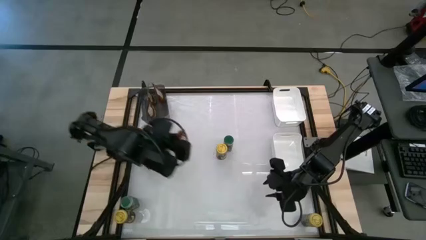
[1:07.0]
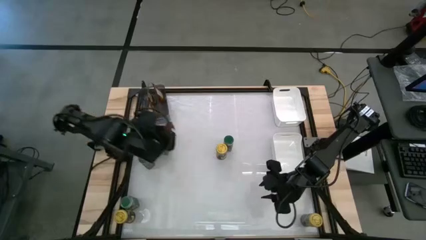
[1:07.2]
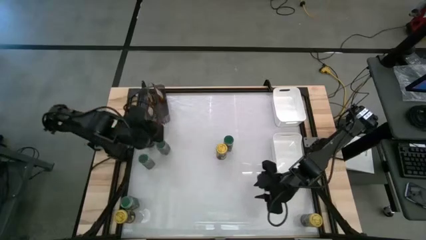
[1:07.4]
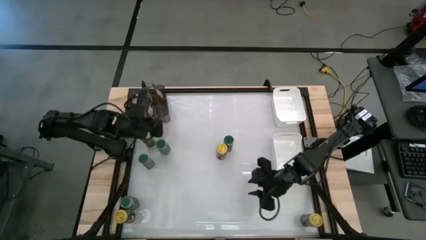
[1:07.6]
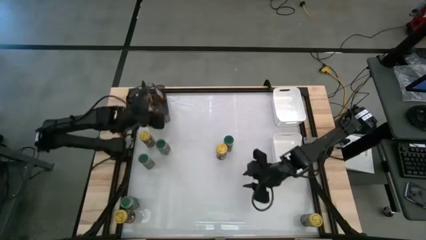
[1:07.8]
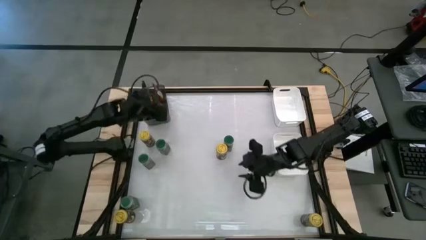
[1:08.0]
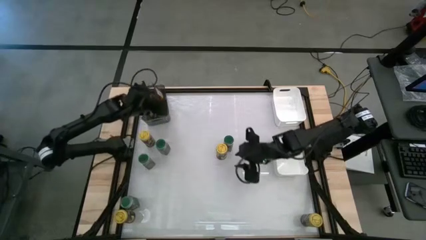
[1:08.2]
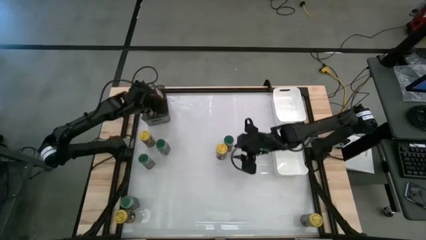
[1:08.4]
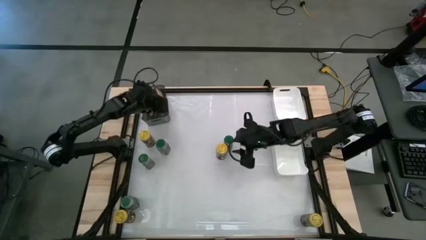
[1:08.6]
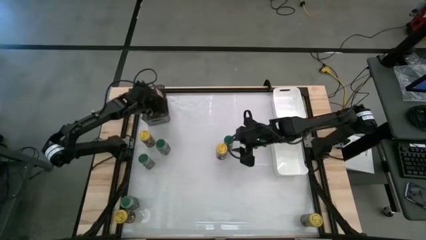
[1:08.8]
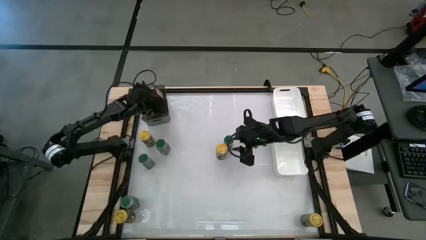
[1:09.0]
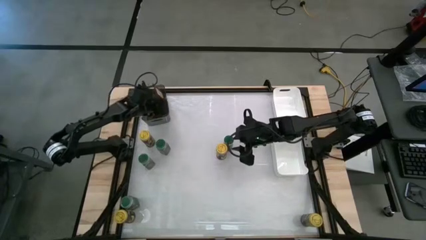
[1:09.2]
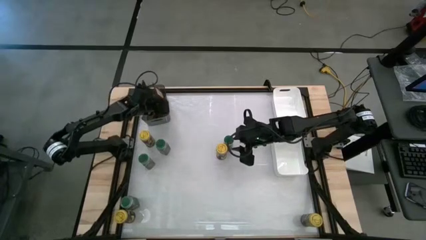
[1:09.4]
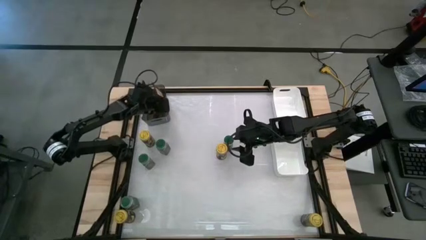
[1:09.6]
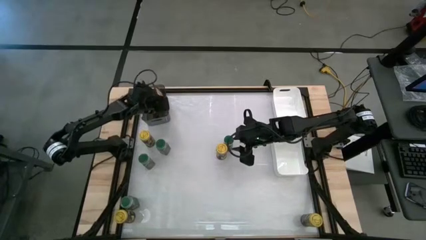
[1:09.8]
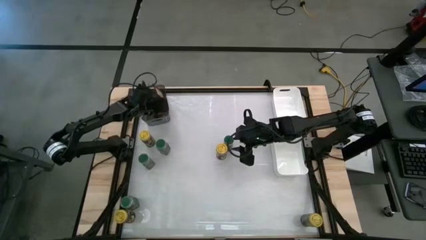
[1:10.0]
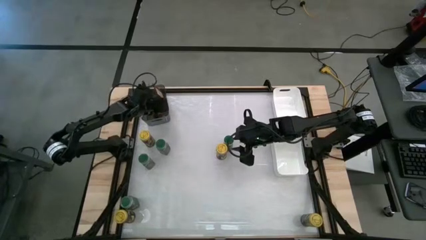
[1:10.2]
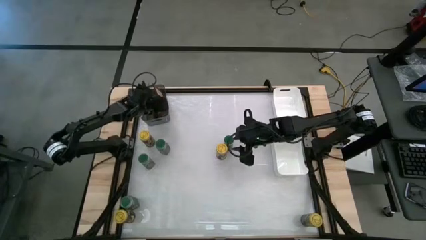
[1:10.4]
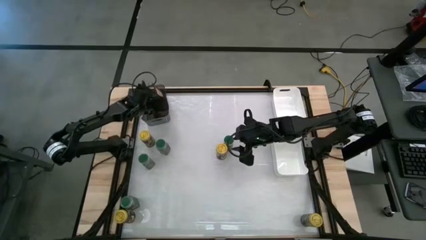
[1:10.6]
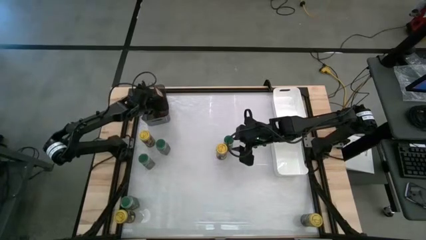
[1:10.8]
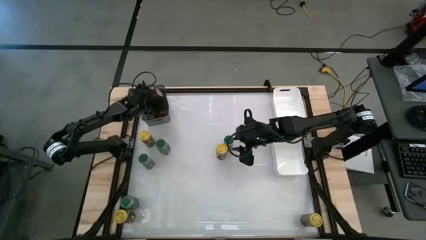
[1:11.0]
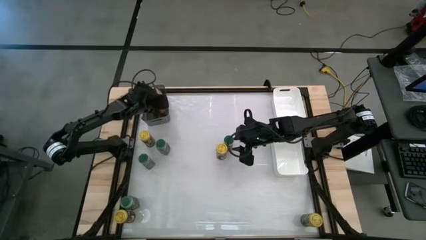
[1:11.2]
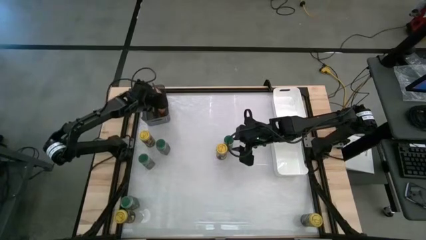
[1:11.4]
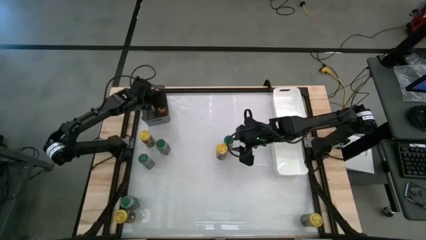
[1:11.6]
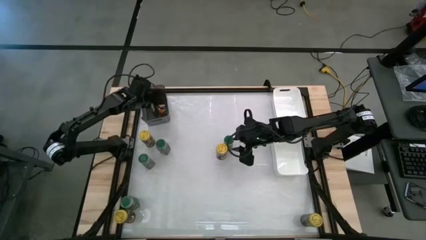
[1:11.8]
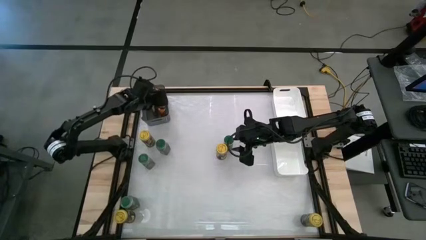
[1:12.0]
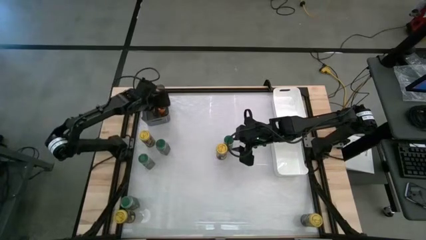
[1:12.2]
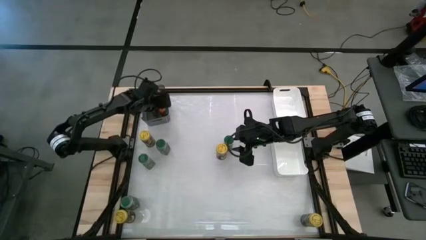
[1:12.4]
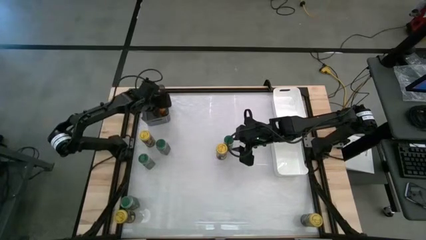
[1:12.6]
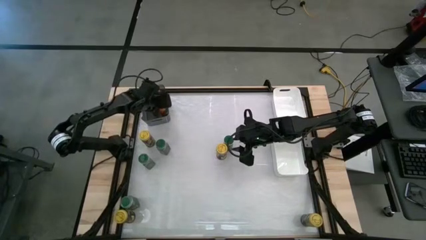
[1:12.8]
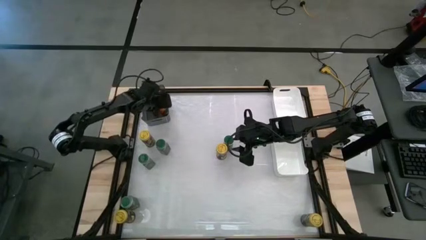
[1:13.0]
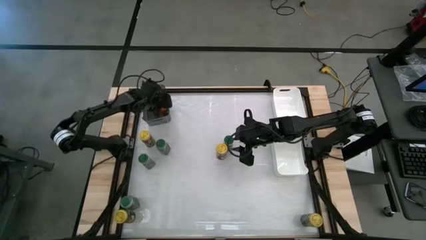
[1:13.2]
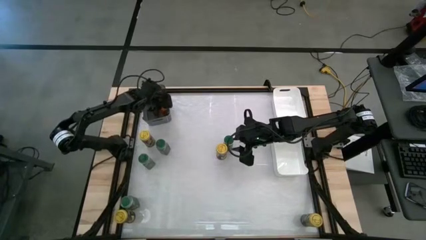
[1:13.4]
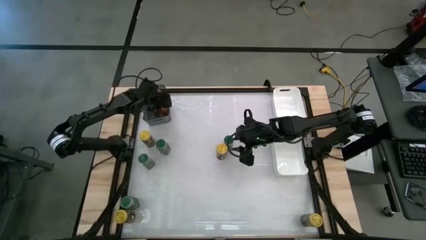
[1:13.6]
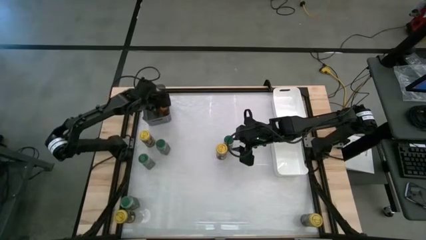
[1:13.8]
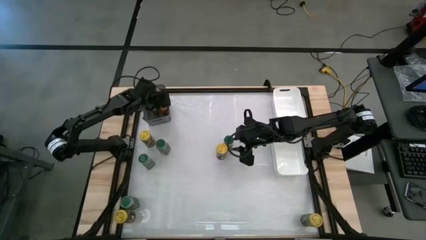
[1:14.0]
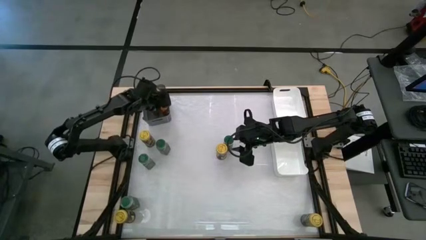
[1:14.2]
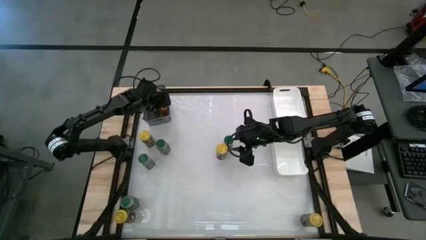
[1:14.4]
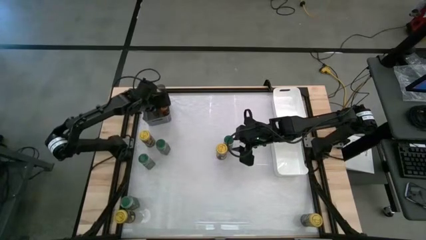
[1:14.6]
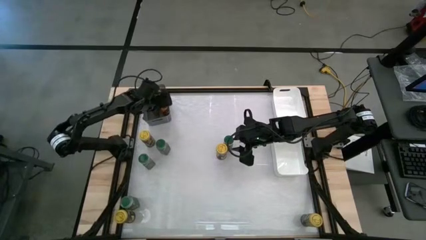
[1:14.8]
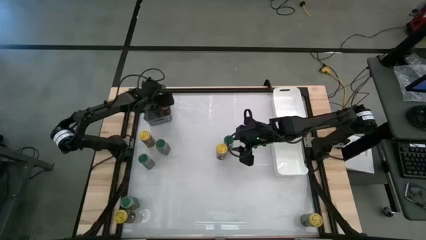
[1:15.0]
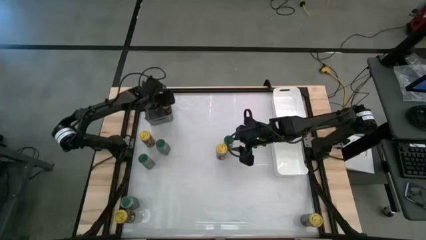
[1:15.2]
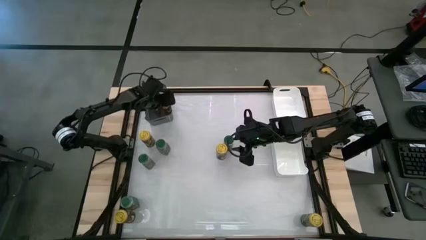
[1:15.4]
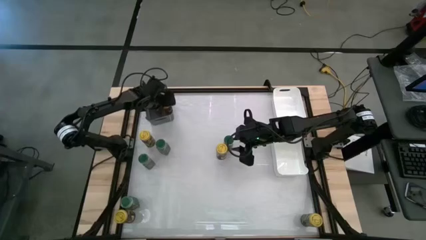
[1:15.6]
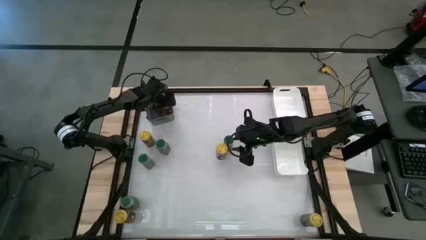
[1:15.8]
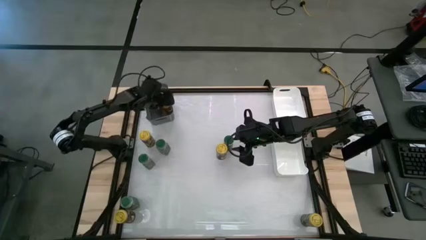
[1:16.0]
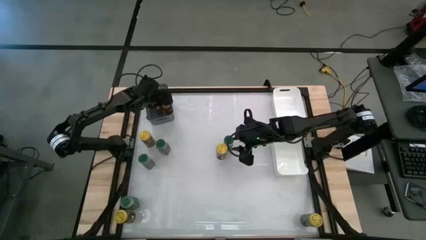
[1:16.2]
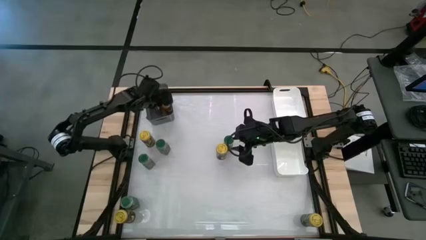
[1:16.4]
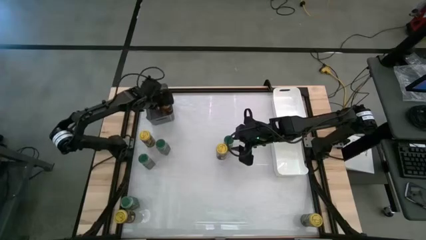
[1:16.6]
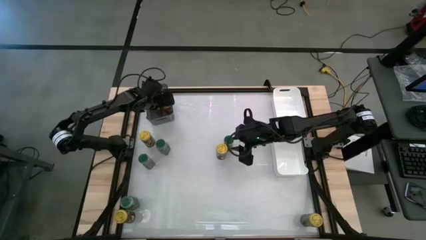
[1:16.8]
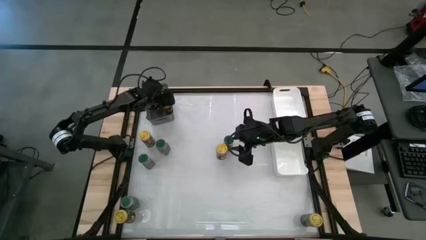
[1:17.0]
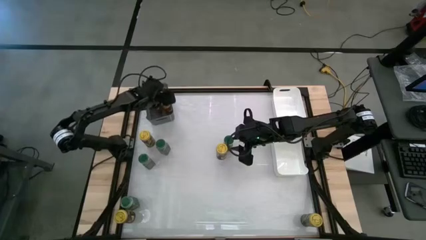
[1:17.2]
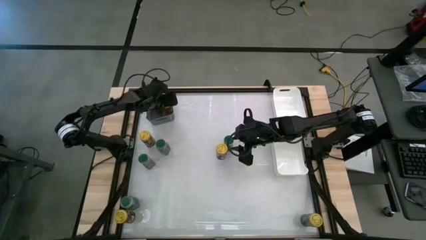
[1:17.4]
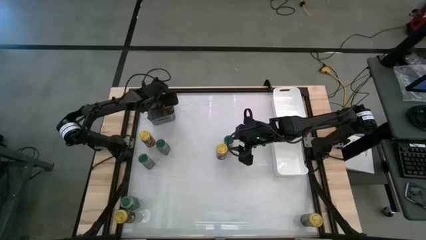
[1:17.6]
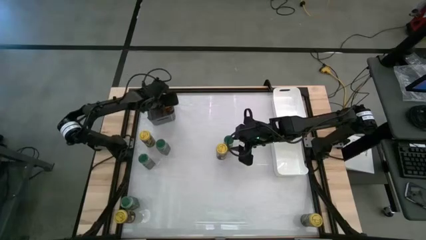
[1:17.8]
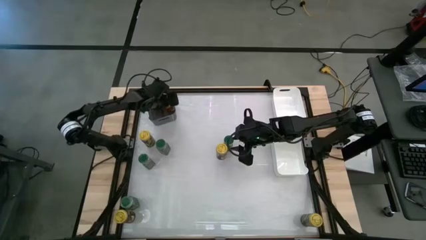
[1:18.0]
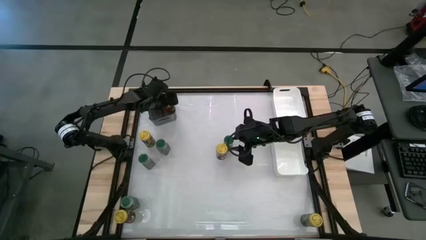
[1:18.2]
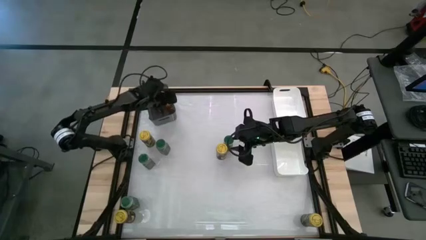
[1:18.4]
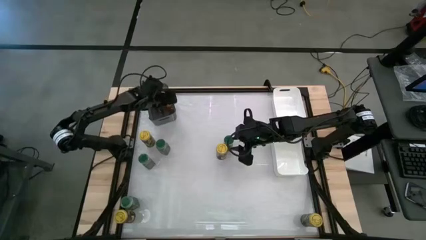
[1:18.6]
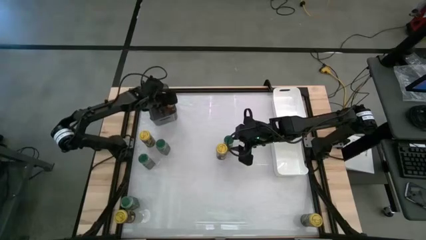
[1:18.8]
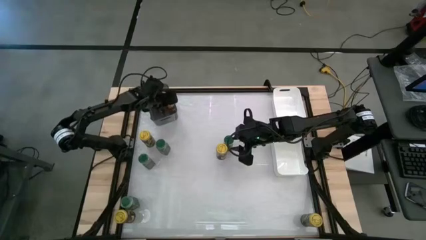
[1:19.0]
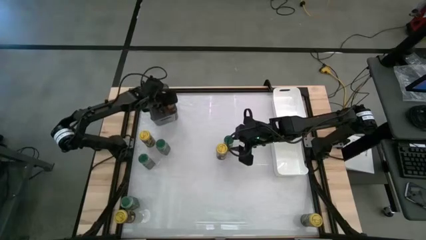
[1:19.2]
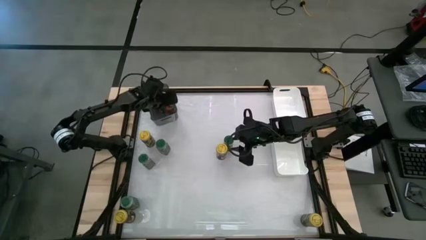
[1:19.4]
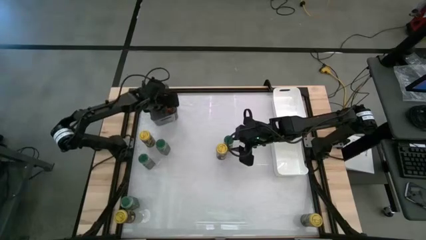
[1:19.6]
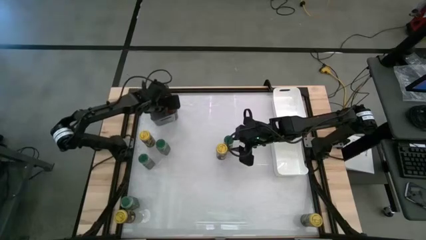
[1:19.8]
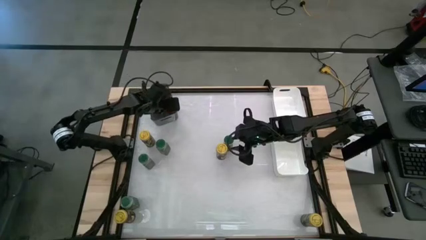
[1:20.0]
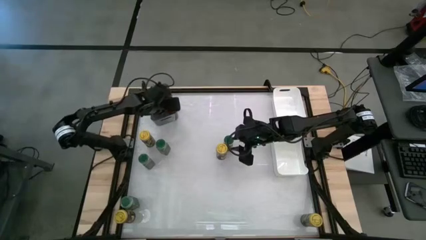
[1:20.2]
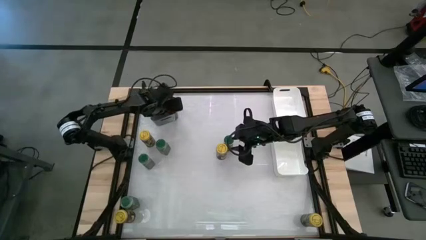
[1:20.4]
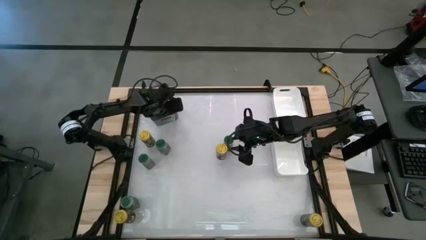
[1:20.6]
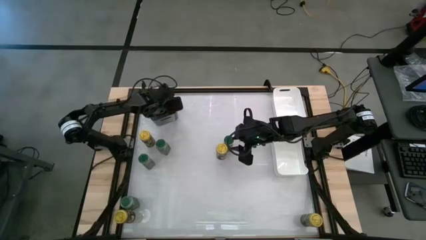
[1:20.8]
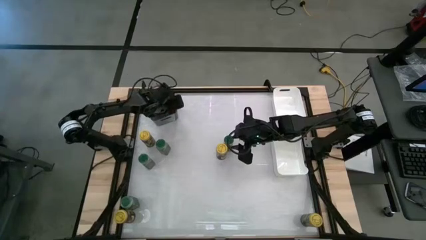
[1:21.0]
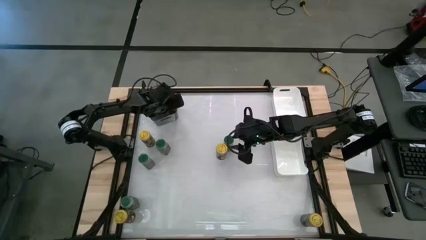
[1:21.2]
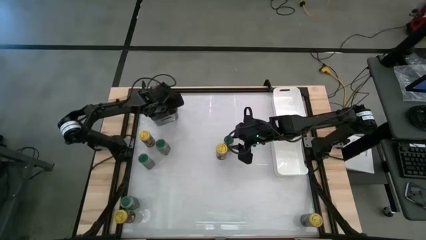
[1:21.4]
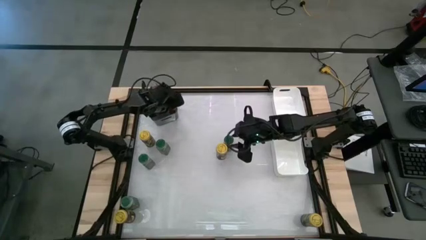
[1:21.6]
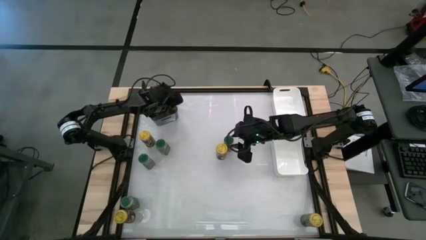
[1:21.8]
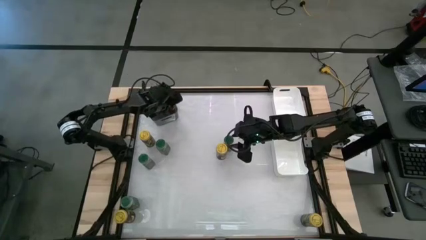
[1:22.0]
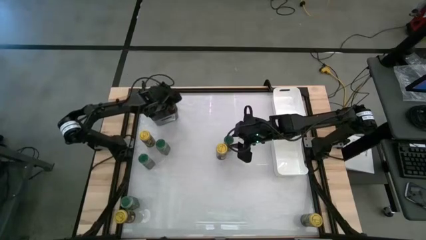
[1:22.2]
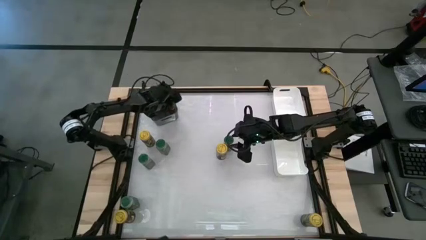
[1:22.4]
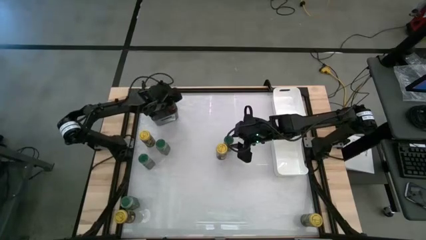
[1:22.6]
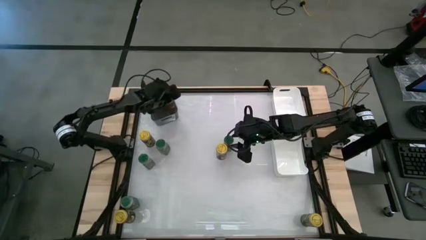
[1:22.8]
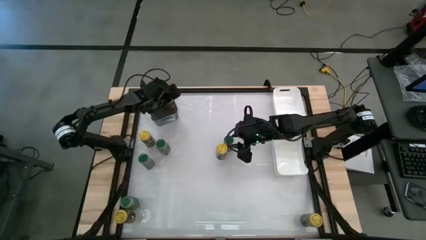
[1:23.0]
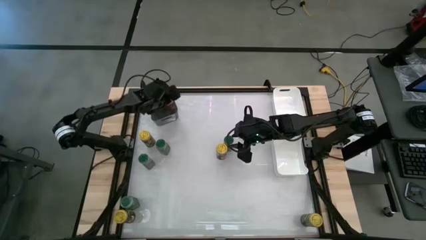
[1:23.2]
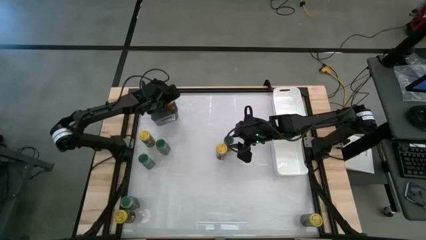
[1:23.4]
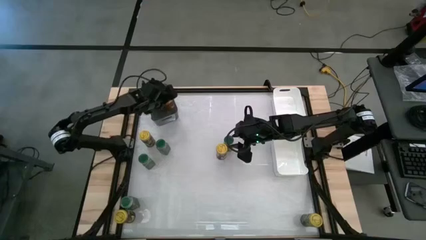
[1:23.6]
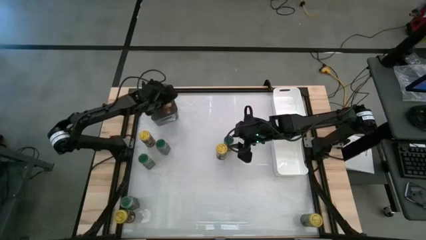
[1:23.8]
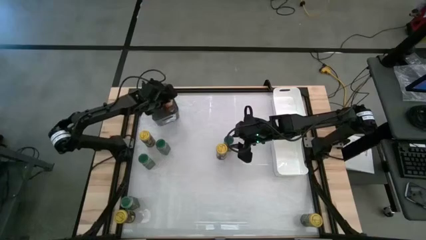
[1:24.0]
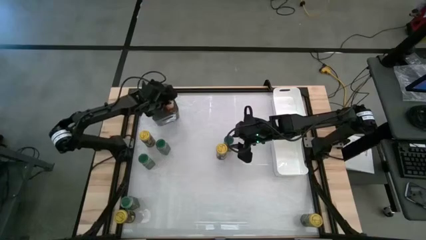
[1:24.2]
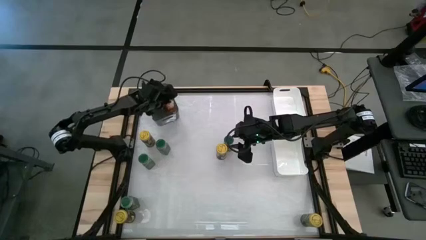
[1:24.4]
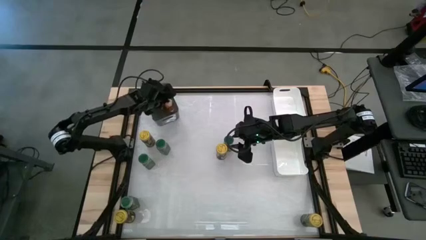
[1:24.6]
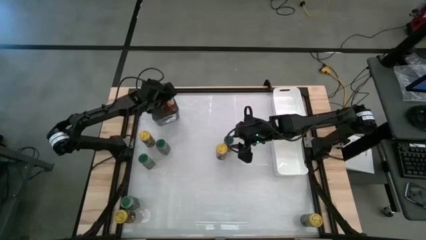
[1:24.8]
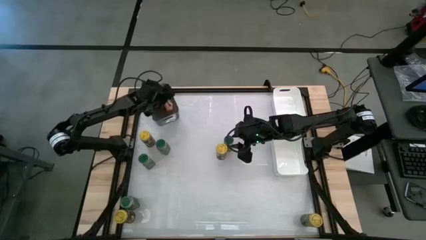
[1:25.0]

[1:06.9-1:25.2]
Task: Sort spices by type
Put the orange seasoning bag into the black bin
